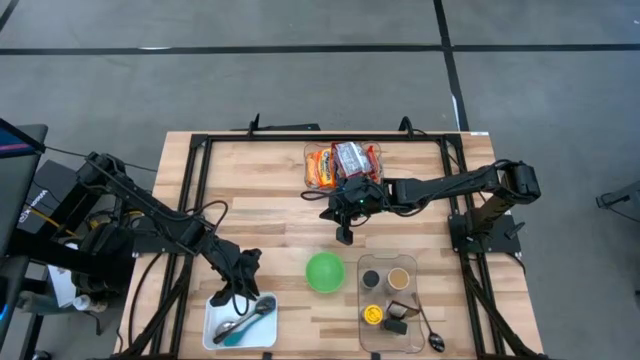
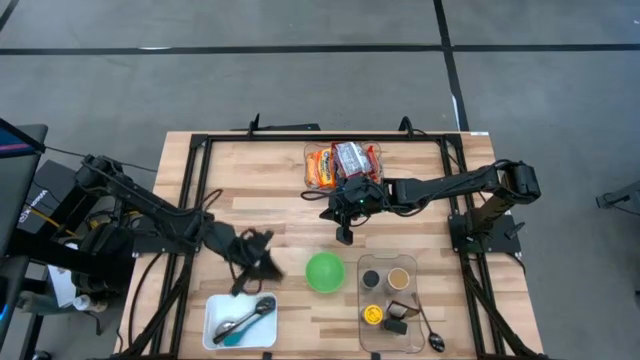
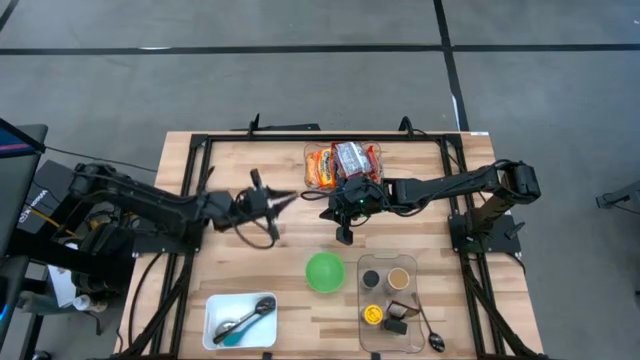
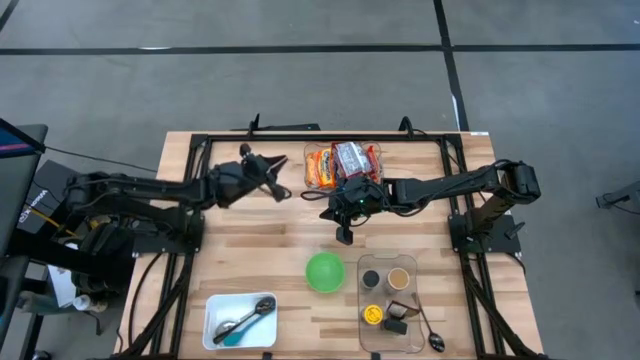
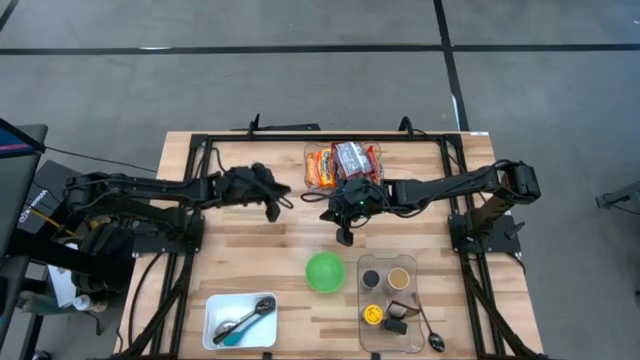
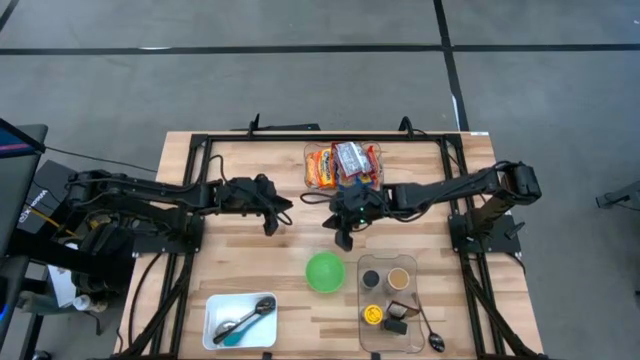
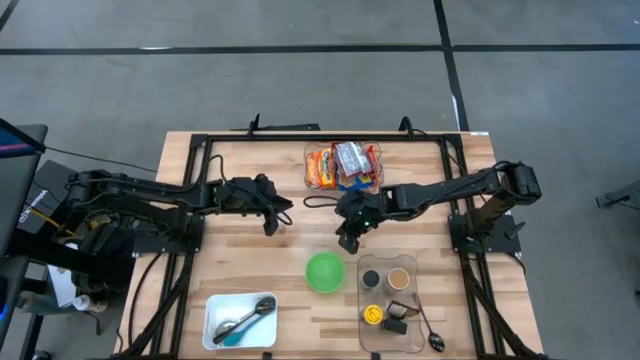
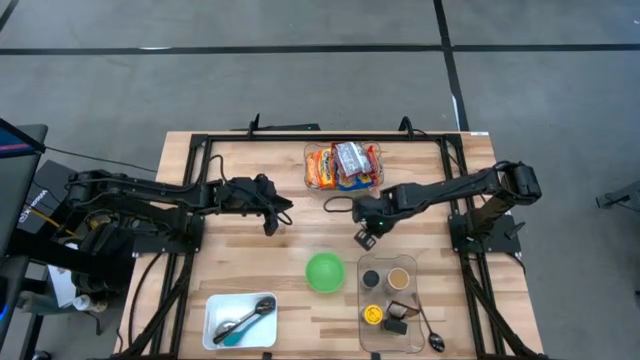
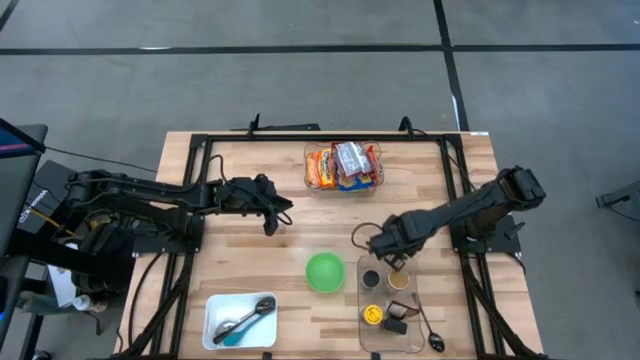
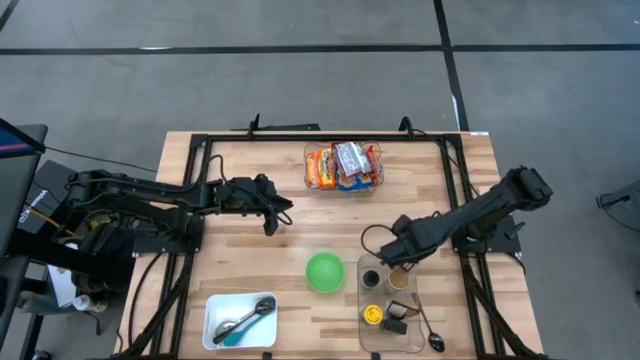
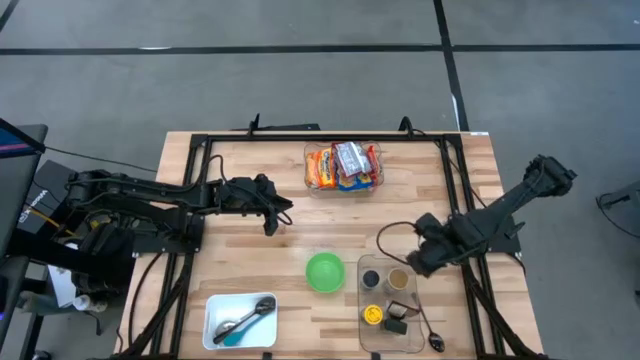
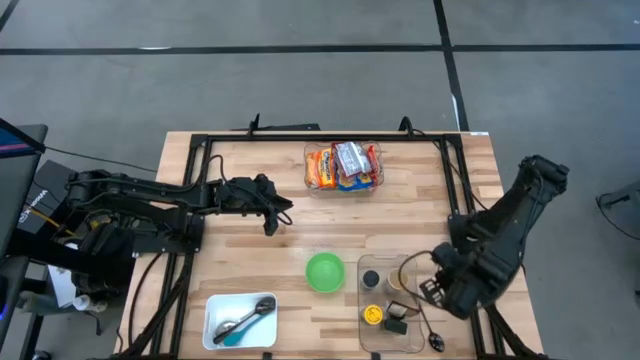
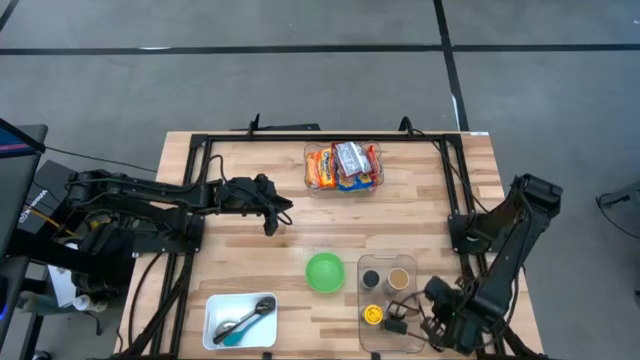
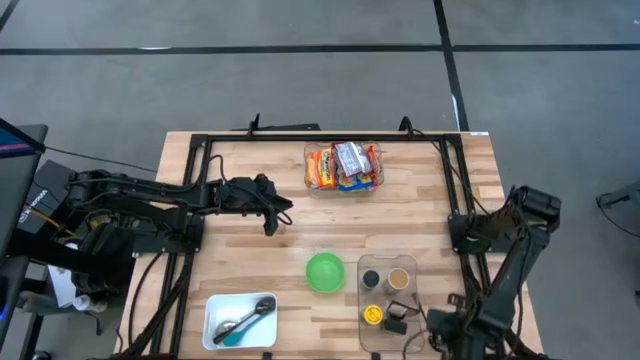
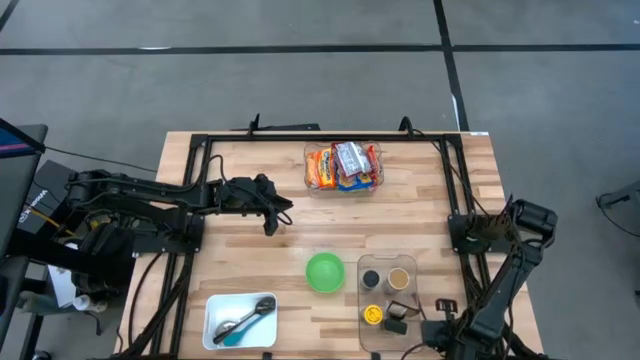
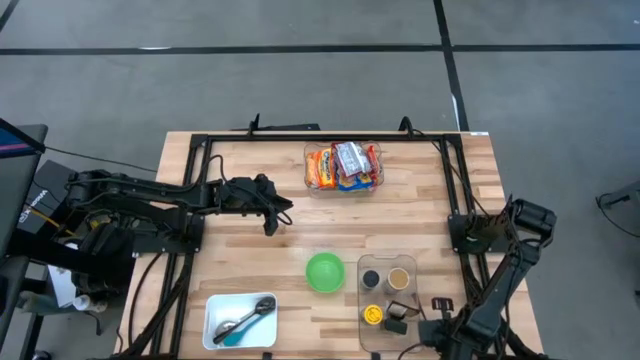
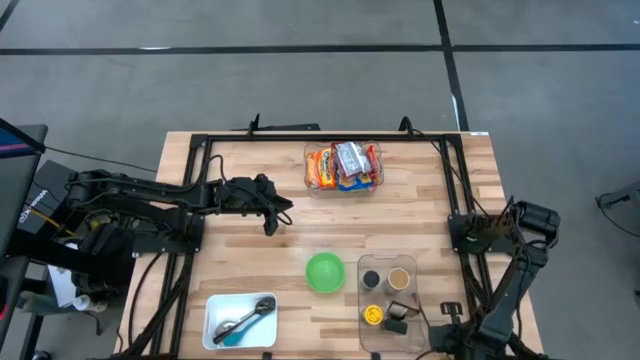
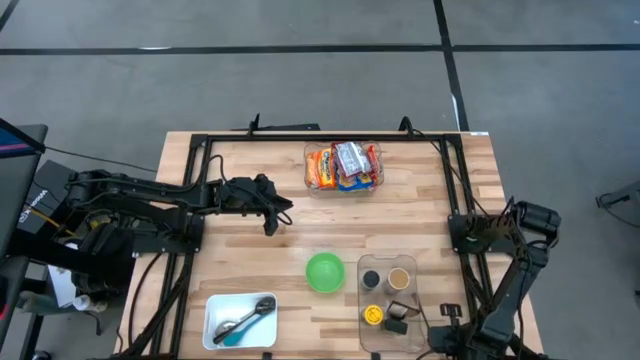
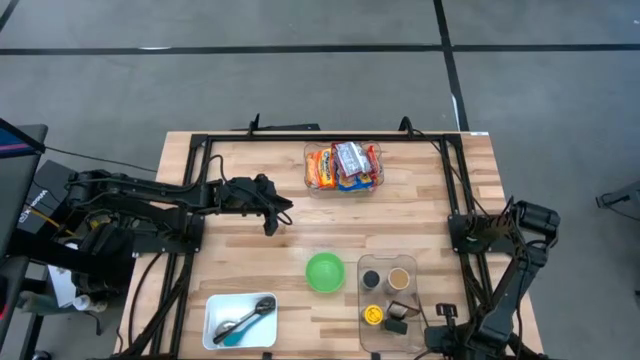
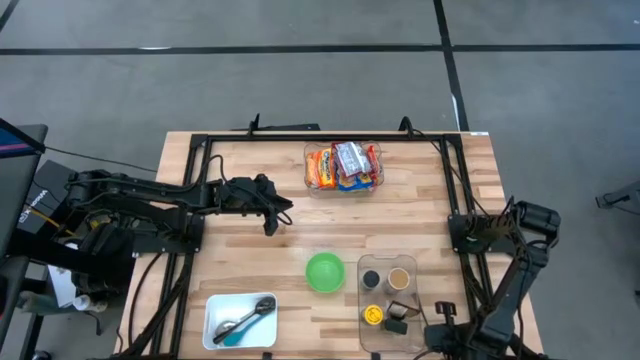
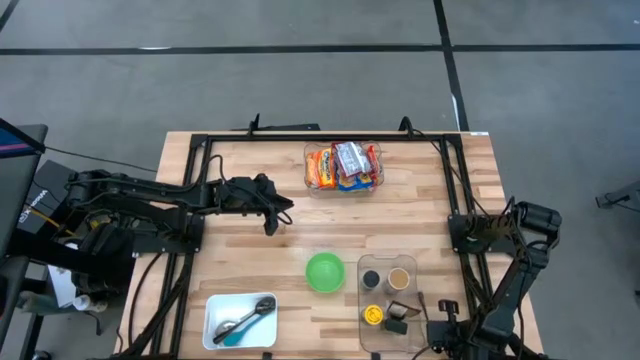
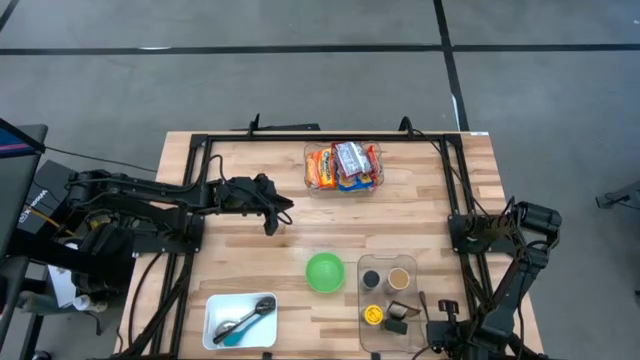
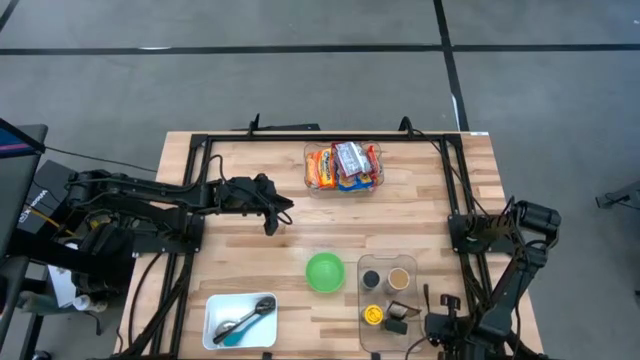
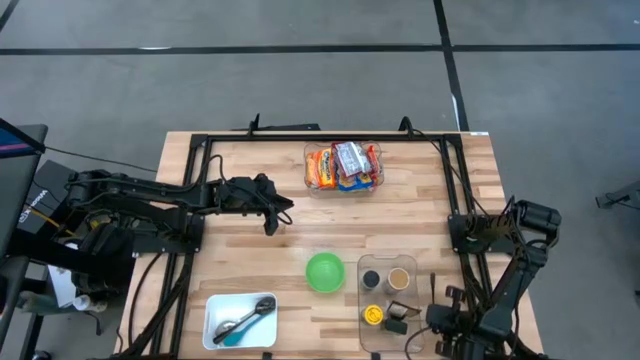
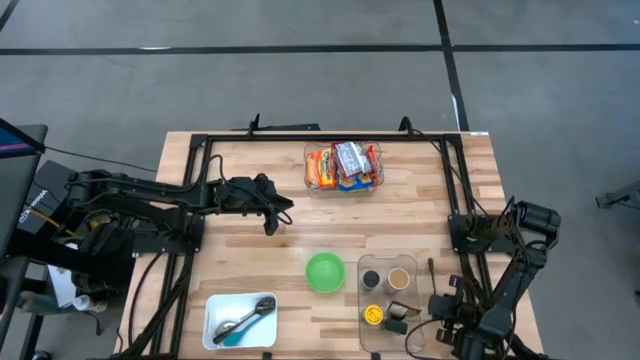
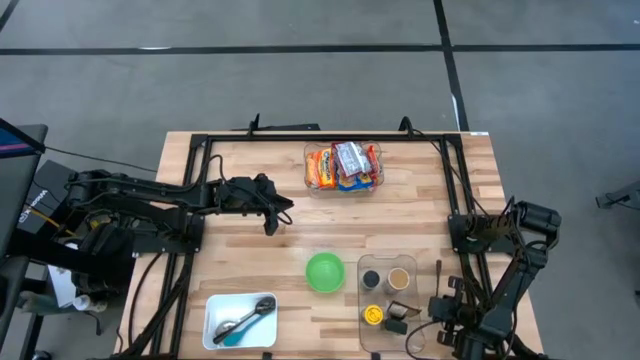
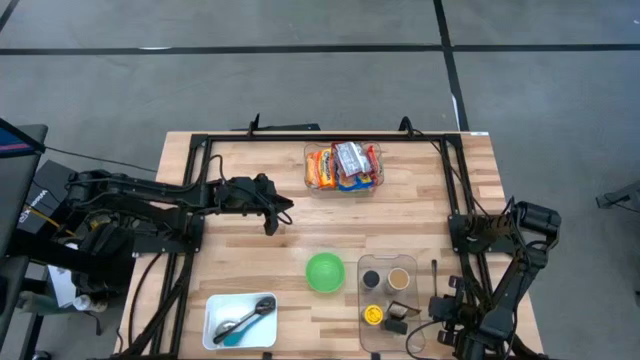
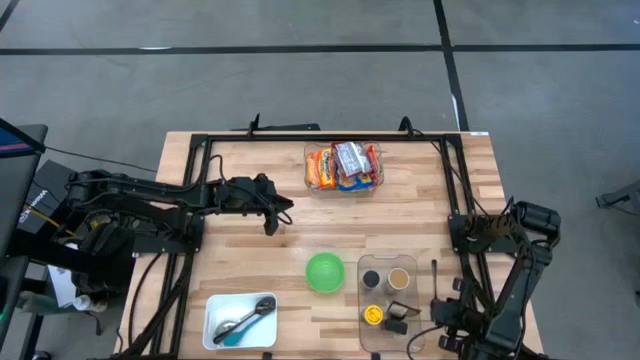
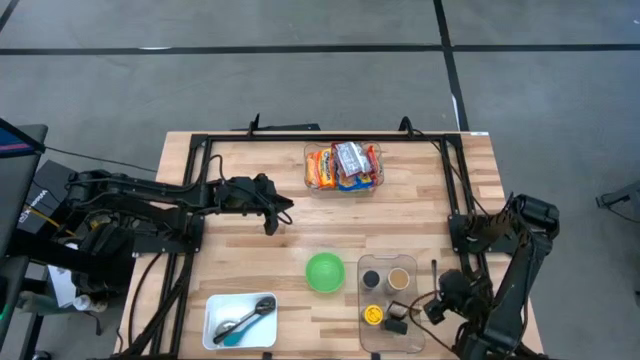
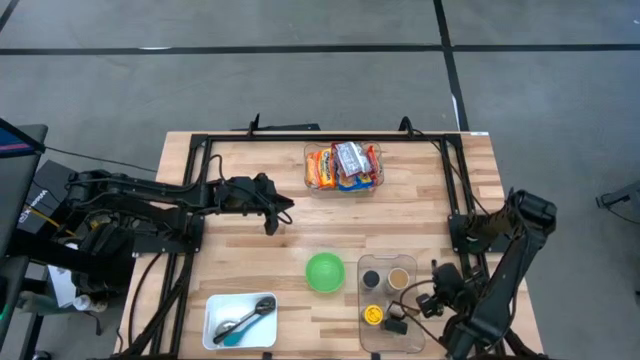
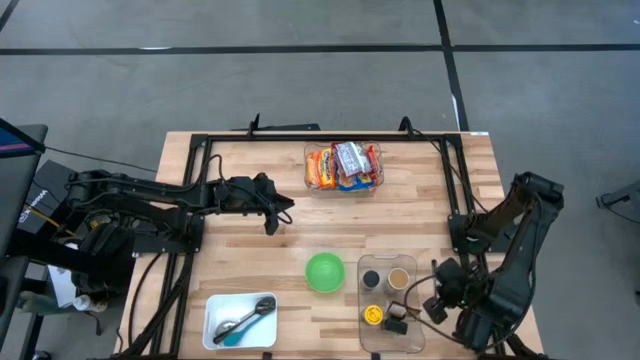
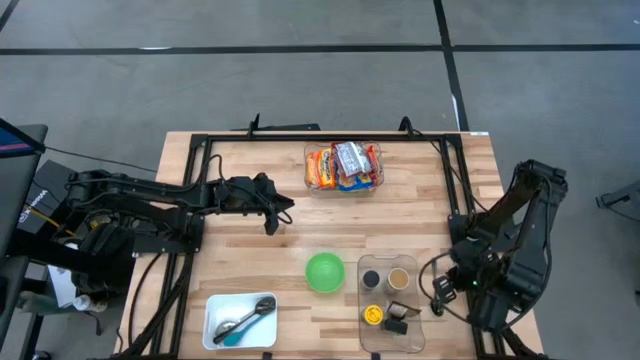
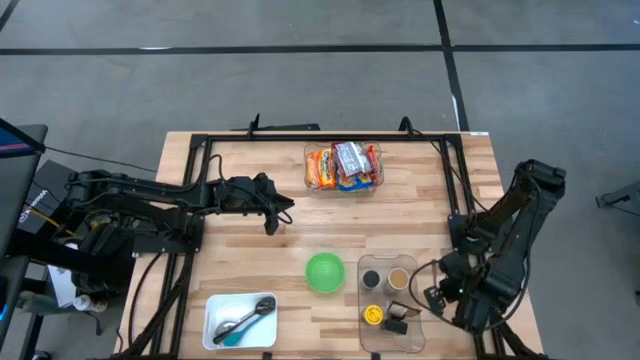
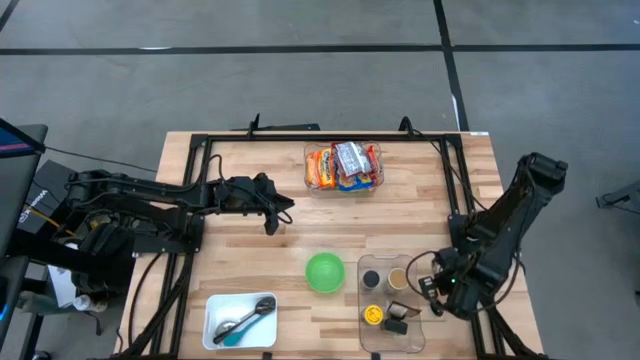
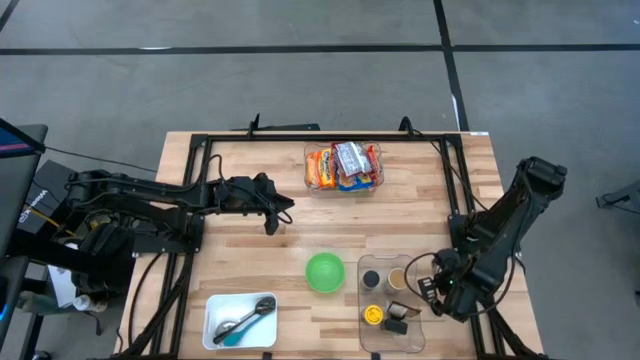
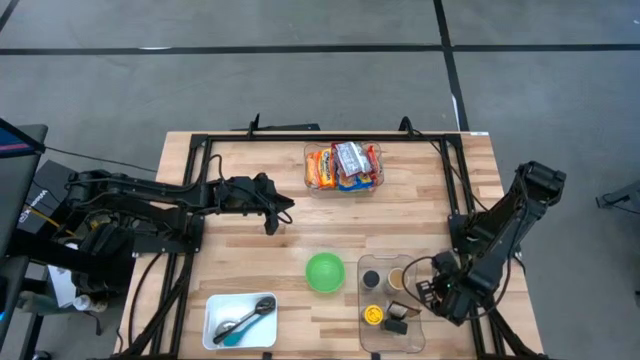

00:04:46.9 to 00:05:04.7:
Task: Pick & Place Food Item
Put the black spoon into the white bin

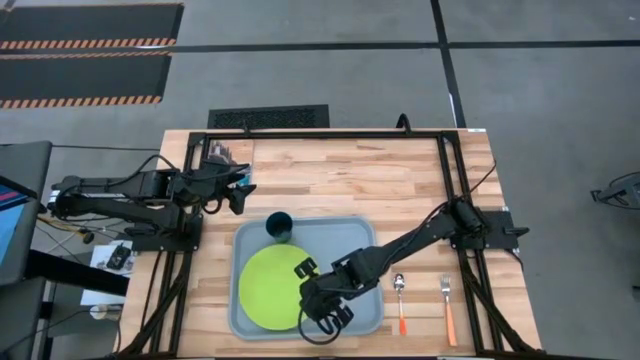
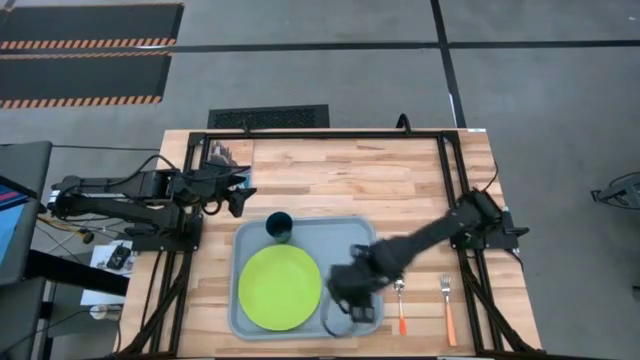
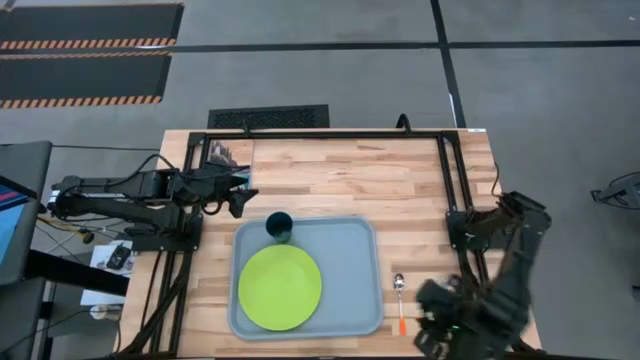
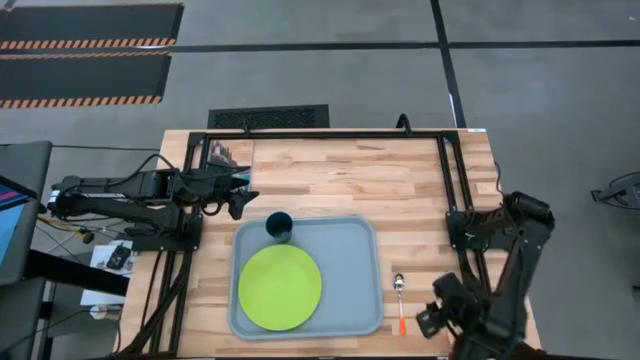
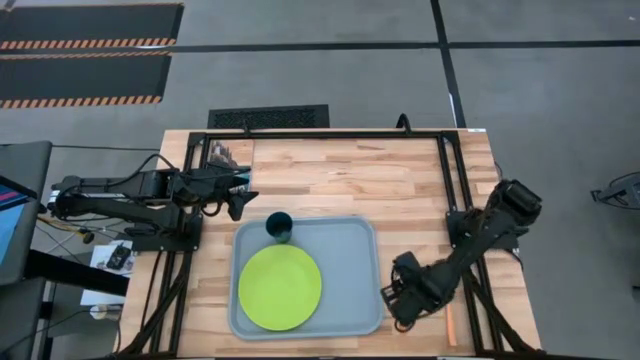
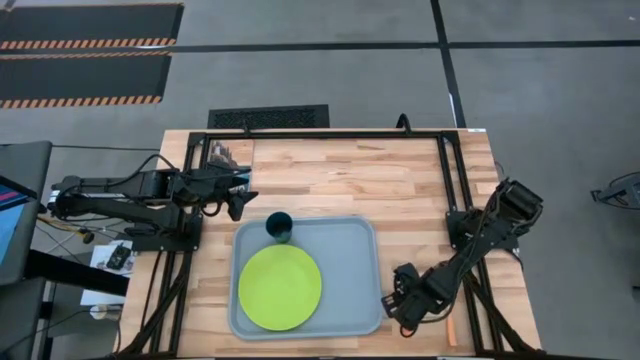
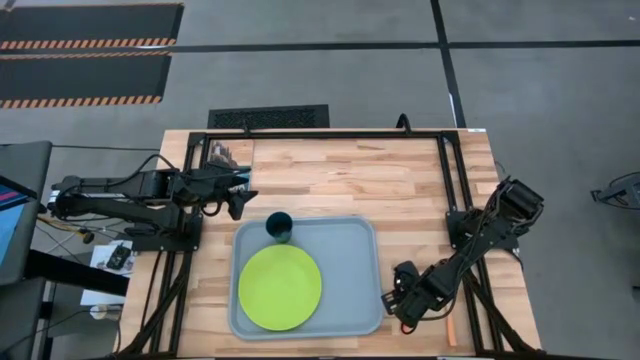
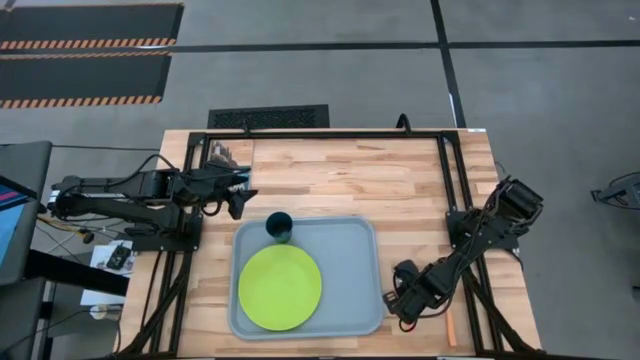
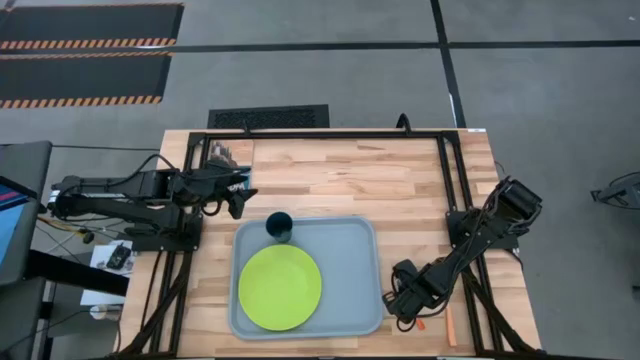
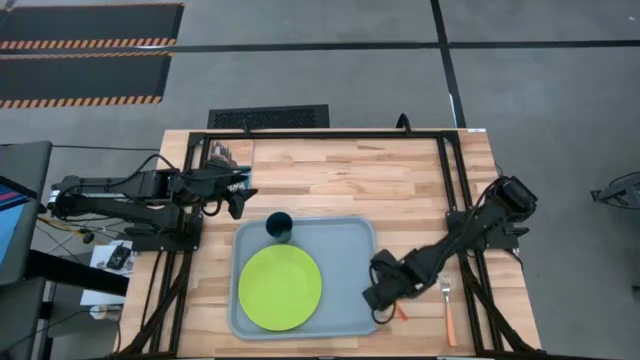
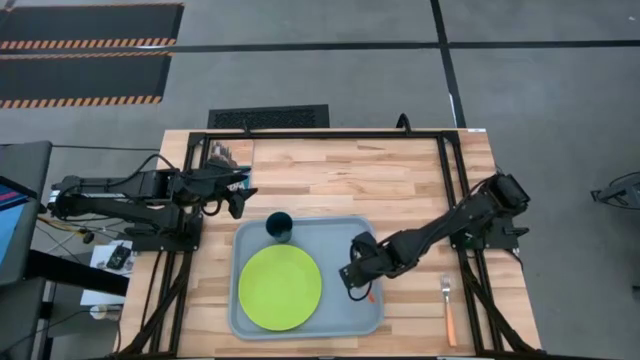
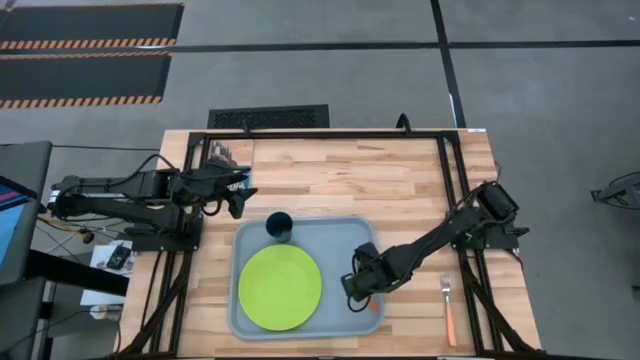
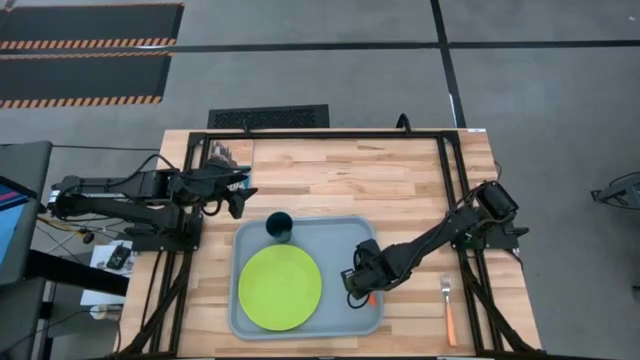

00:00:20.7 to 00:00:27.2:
Task: Pick and place plate/cup/fork/spoon on tray
Put the orange spoon on the gray serving tray to the right of the plate
